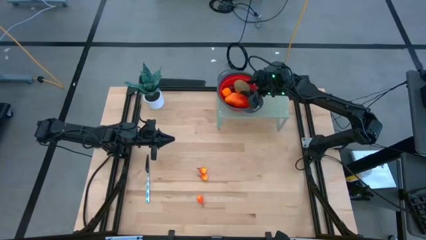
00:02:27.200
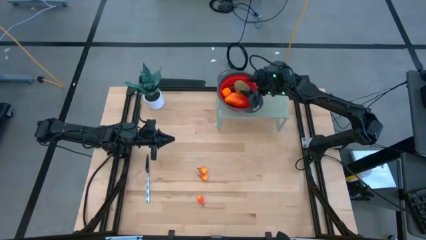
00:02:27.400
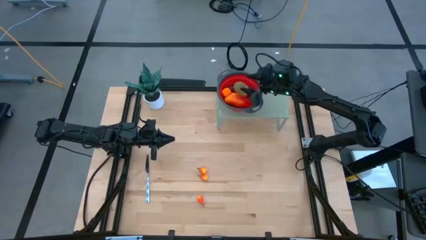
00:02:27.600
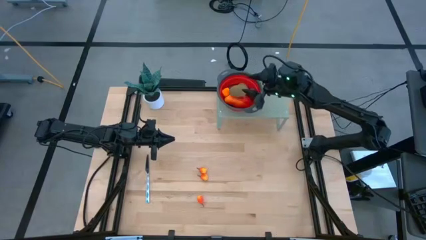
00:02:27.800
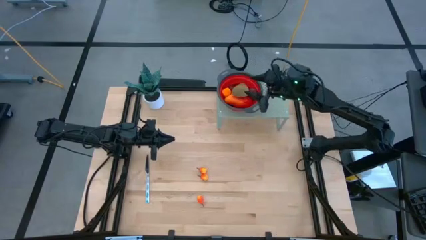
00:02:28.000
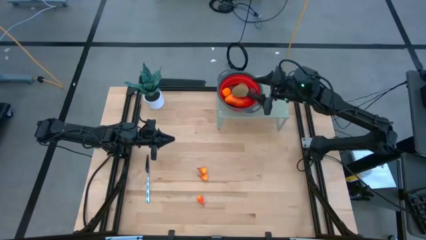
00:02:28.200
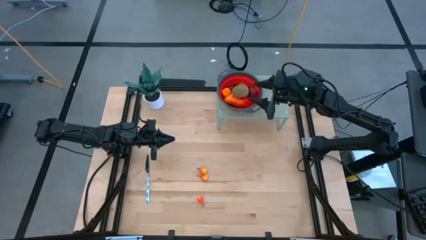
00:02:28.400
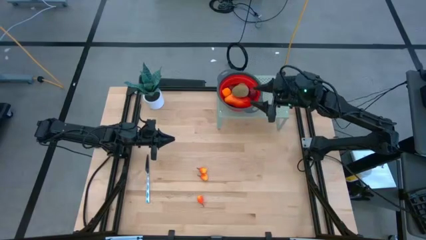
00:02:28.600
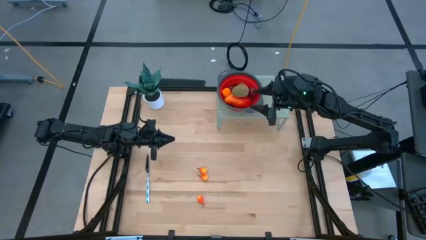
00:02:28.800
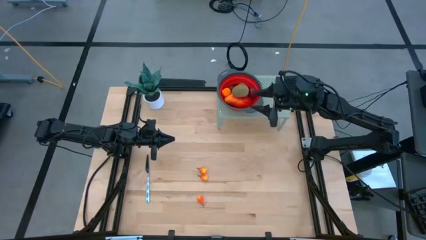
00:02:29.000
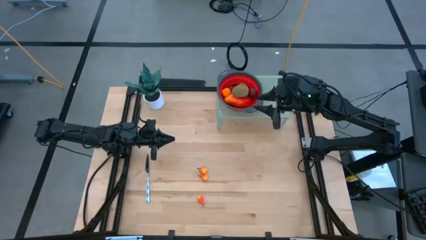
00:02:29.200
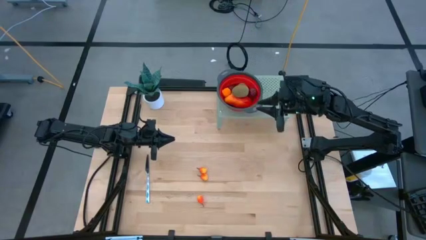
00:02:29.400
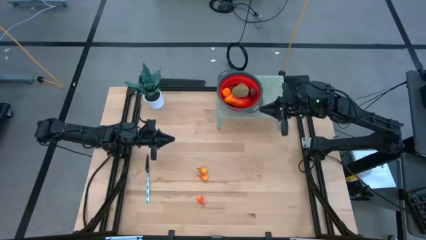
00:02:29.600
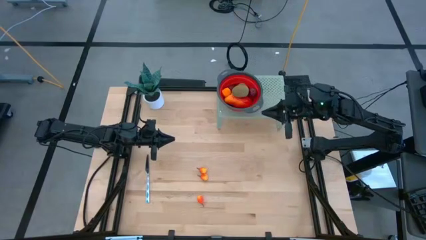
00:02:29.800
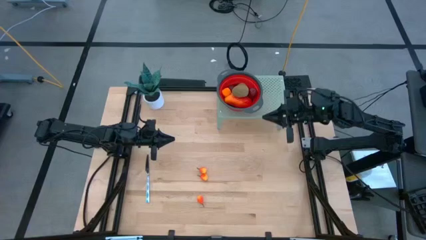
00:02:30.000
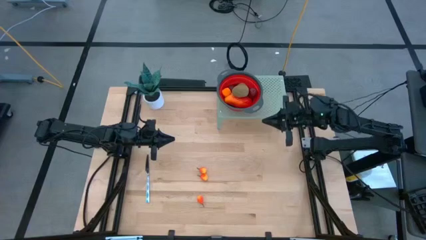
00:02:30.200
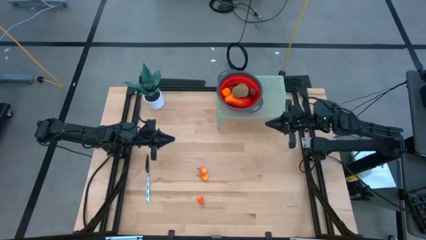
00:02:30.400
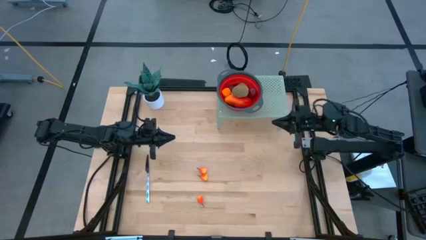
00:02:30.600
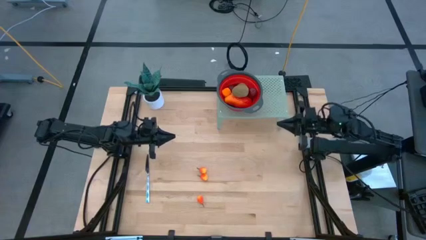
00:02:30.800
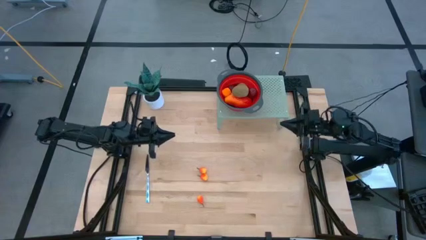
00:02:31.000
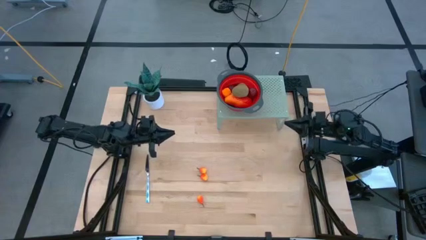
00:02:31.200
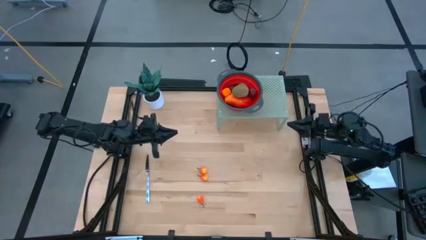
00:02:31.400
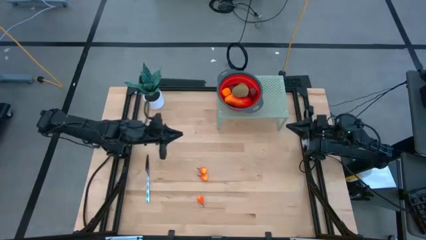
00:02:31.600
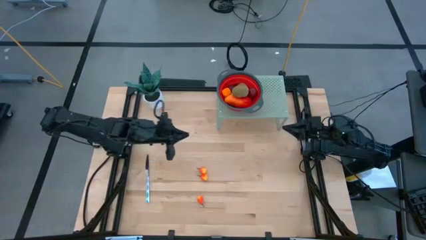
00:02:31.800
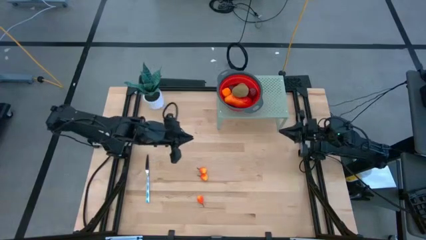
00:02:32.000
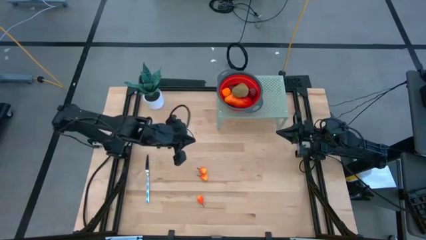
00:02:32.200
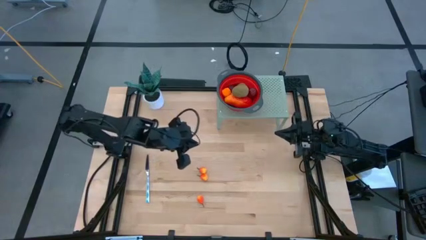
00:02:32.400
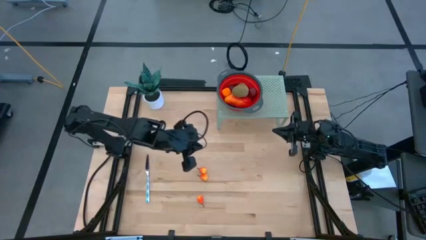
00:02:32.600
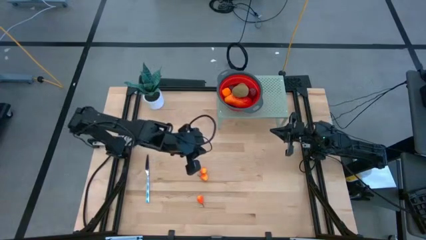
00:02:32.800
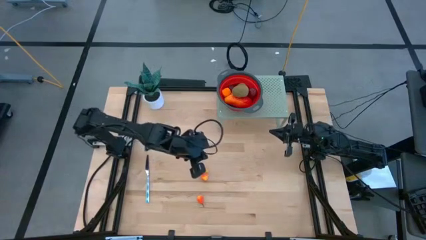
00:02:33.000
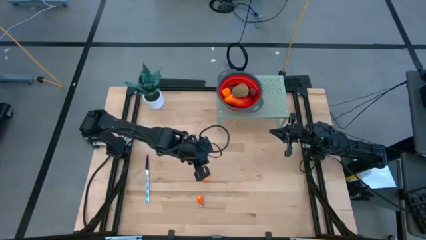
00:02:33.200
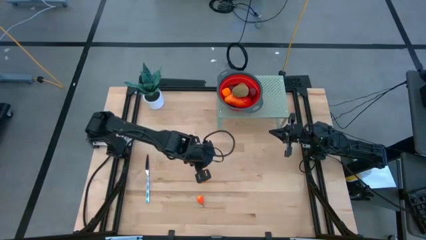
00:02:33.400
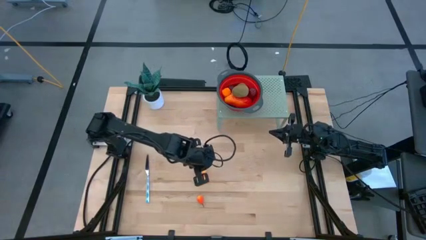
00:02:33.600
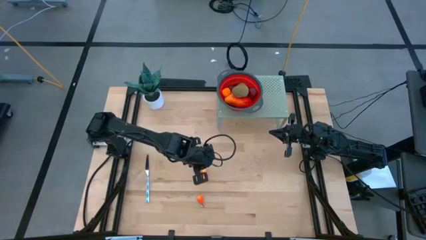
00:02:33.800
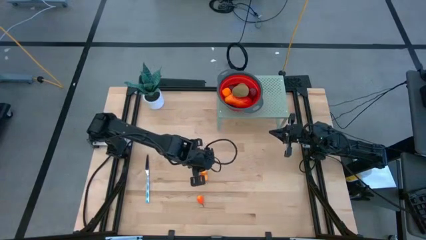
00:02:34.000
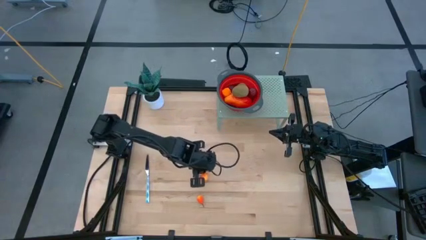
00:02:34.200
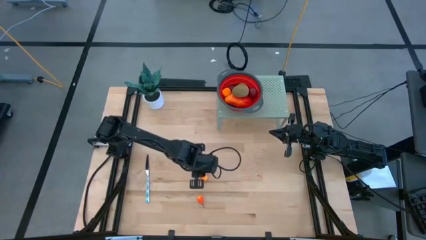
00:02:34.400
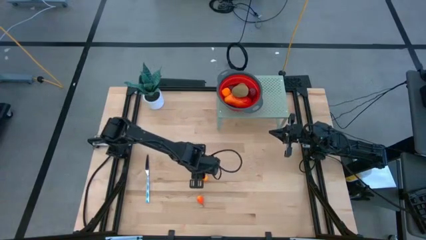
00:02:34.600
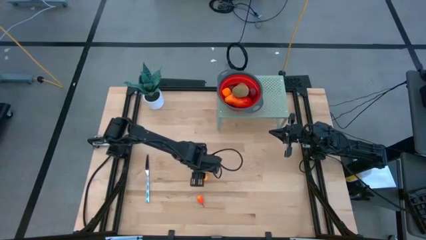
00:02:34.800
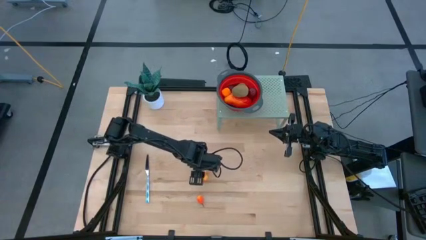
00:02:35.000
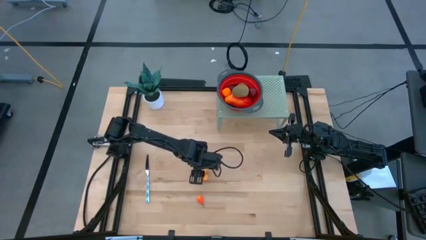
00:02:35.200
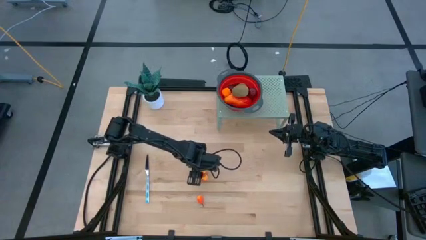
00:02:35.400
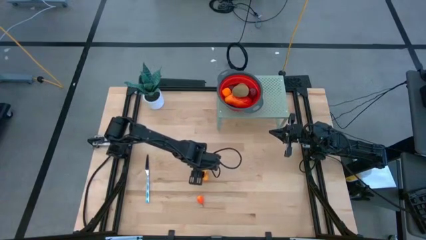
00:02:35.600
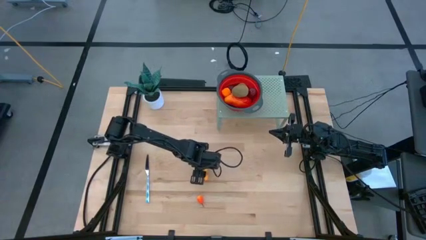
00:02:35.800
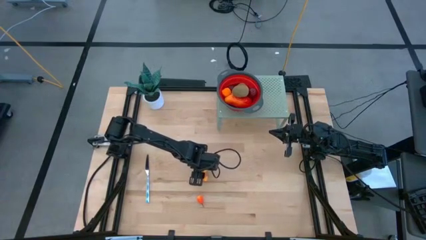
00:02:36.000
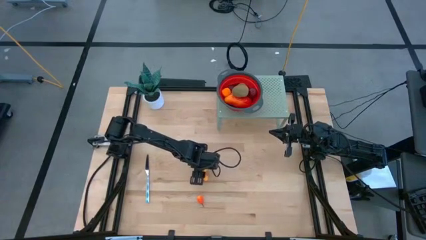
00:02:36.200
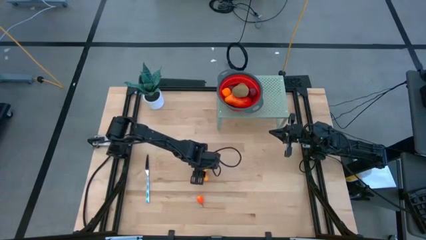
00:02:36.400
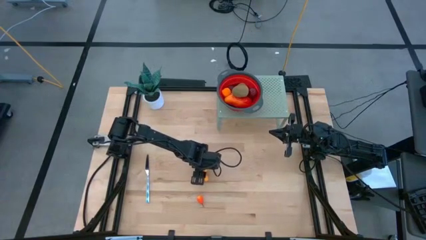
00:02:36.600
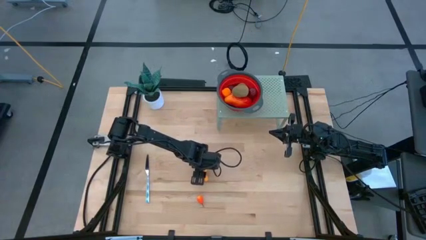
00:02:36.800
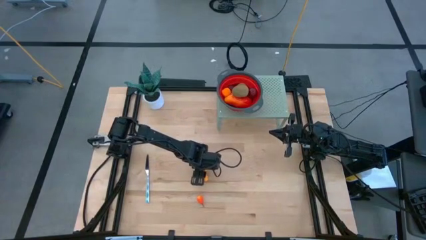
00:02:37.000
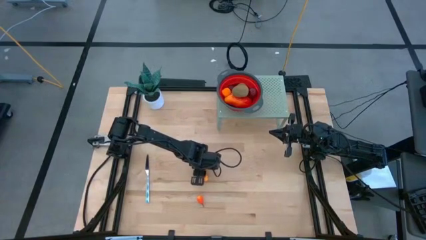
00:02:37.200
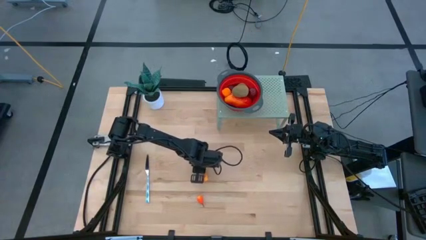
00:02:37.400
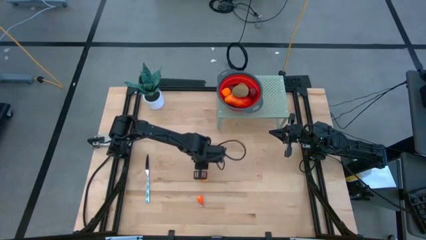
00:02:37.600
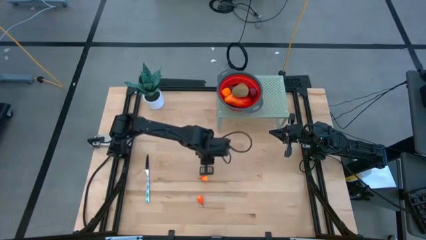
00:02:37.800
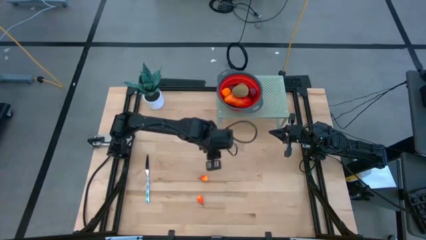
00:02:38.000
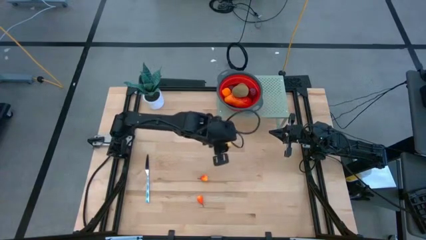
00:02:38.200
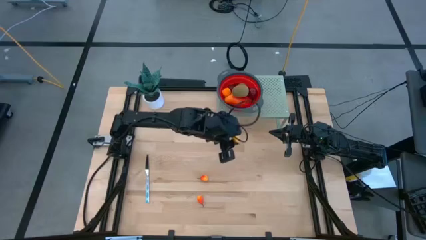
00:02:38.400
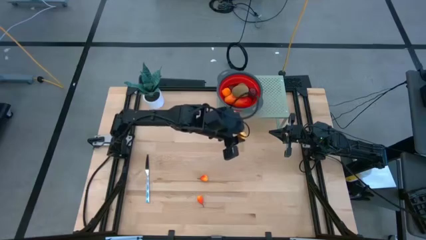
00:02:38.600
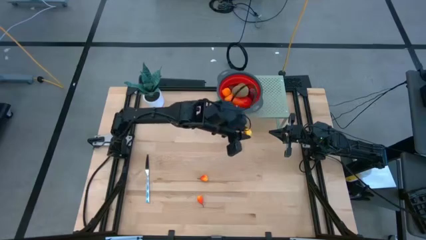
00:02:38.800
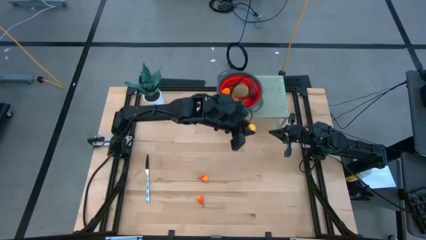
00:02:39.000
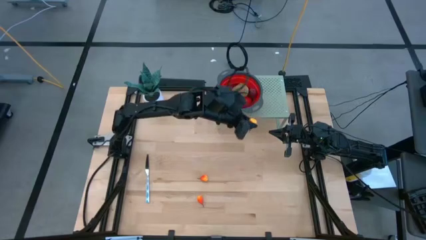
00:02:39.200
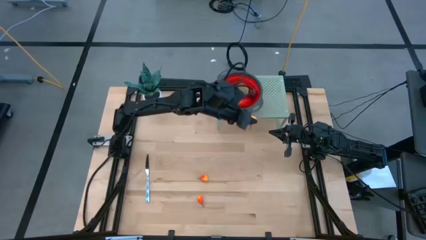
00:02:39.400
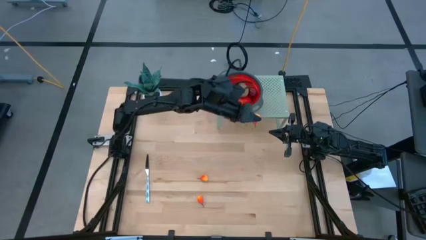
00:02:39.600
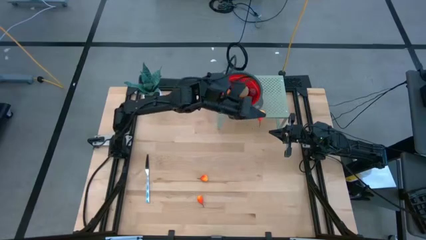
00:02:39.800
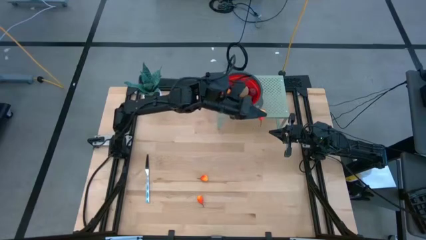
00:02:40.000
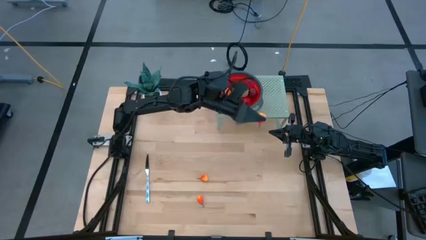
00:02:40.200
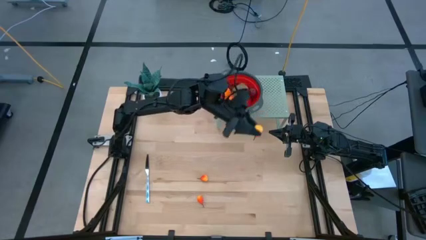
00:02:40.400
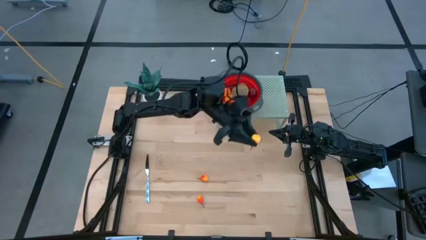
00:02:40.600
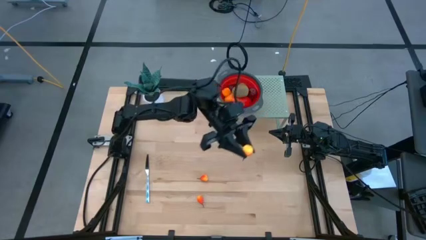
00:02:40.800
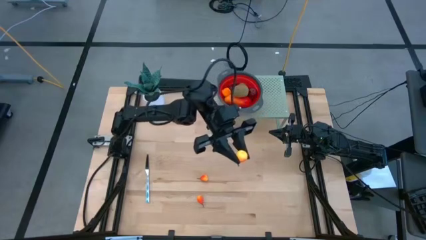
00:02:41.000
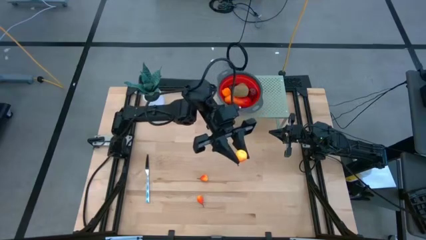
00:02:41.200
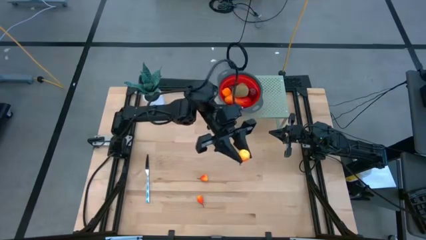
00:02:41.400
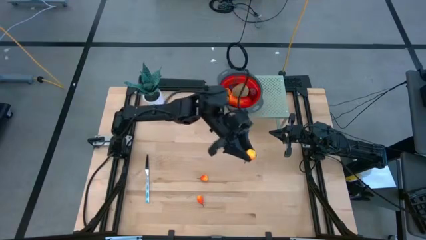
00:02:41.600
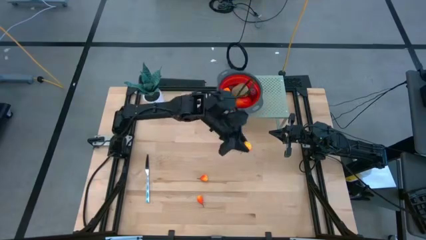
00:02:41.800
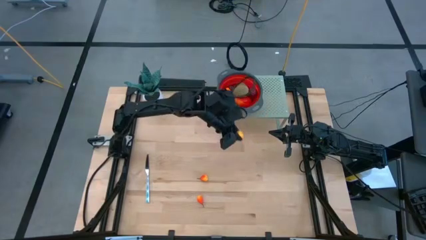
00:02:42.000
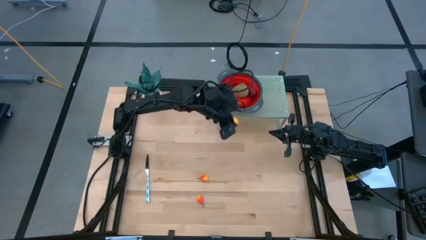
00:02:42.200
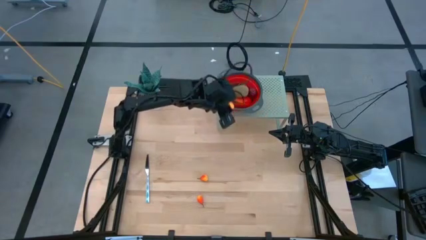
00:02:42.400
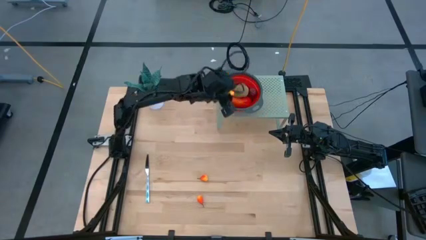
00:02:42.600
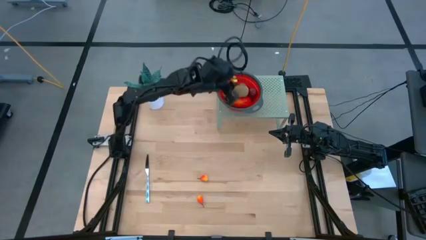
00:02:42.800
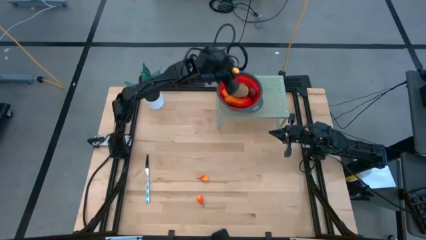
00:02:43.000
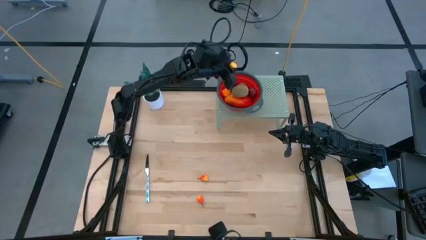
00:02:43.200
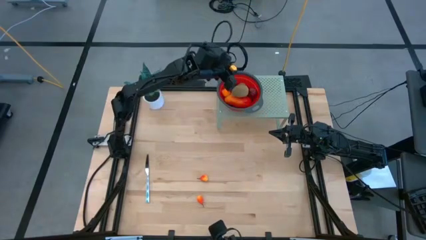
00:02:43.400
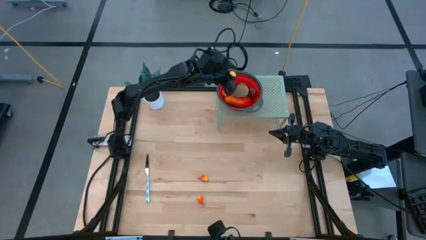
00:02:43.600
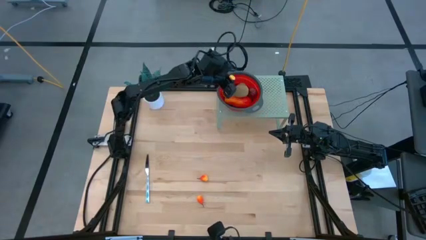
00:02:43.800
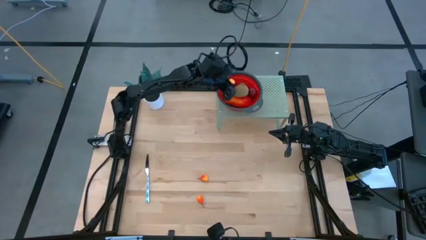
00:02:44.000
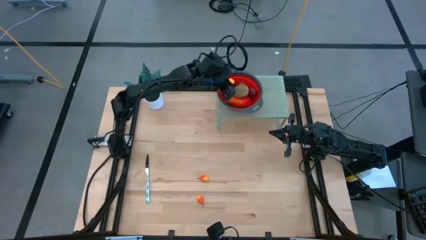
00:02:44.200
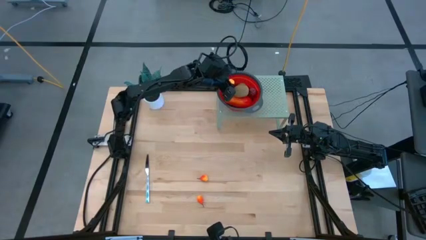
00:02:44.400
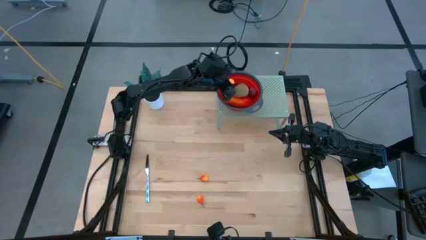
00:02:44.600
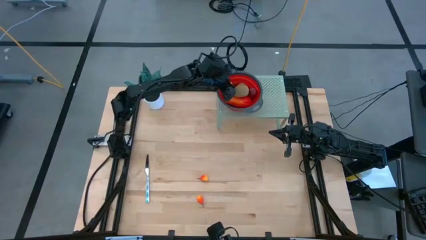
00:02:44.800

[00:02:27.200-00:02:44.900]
Task: Pick & Place Fruit
Put the yellow peach into the red strainer bowl on the shelf
